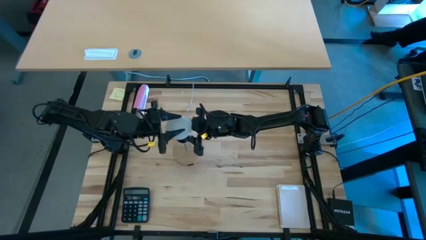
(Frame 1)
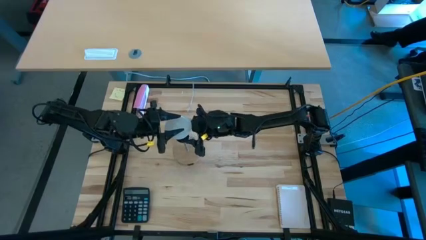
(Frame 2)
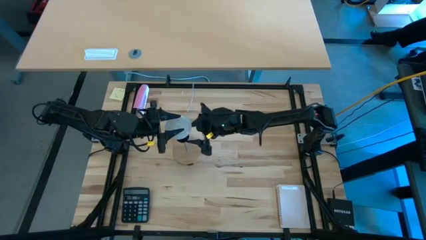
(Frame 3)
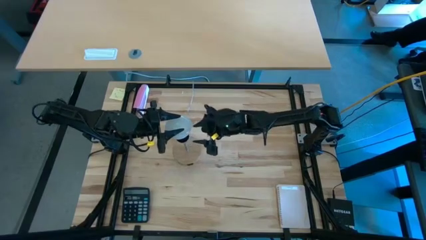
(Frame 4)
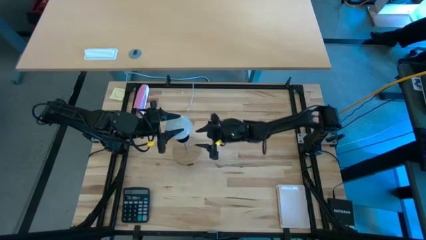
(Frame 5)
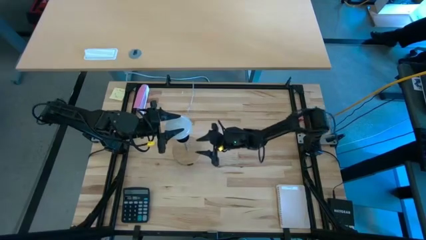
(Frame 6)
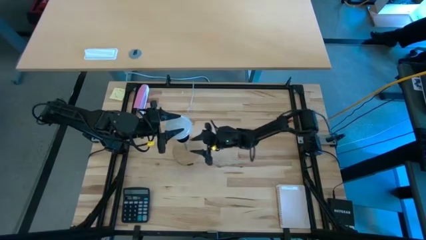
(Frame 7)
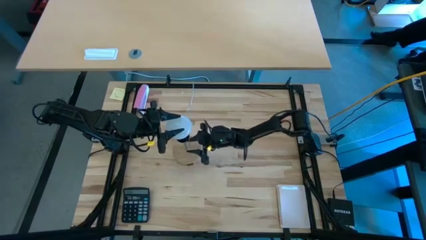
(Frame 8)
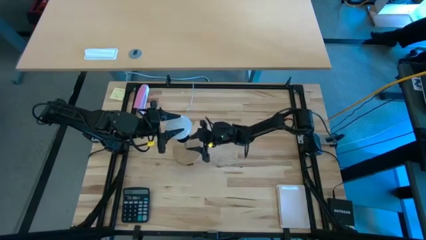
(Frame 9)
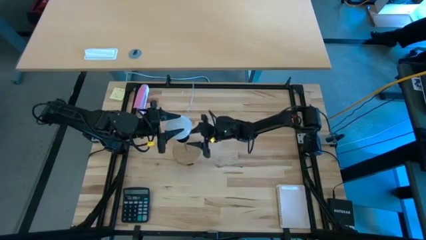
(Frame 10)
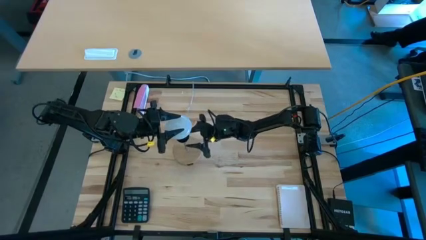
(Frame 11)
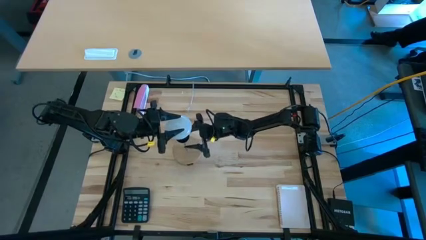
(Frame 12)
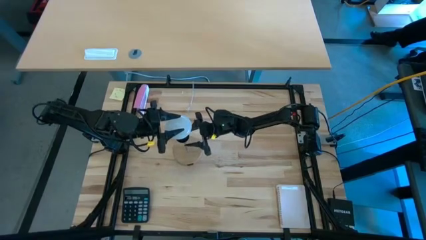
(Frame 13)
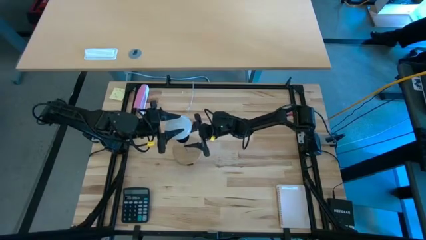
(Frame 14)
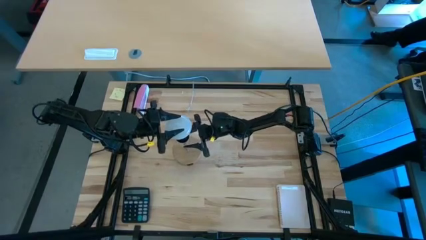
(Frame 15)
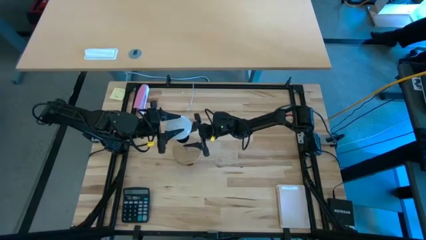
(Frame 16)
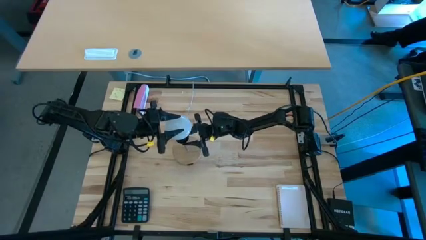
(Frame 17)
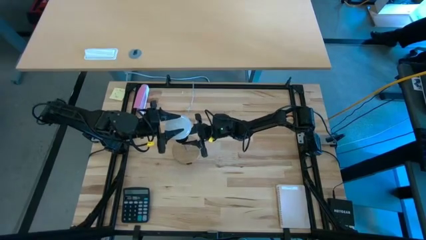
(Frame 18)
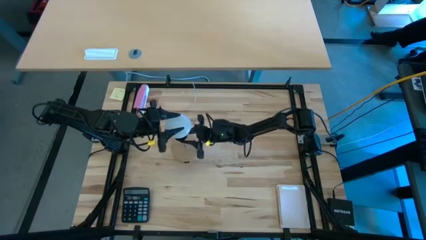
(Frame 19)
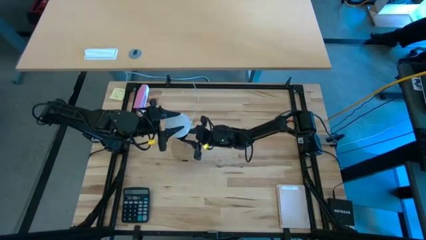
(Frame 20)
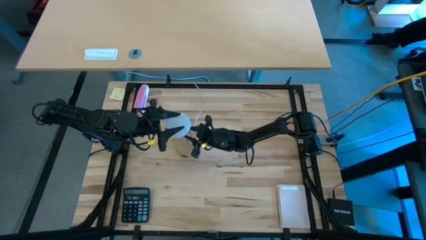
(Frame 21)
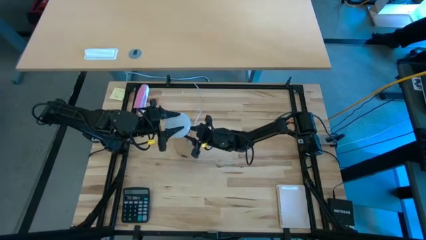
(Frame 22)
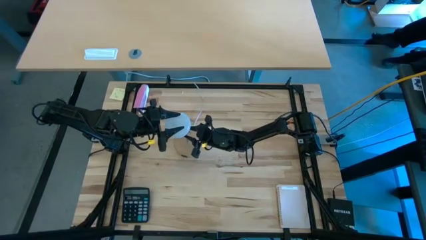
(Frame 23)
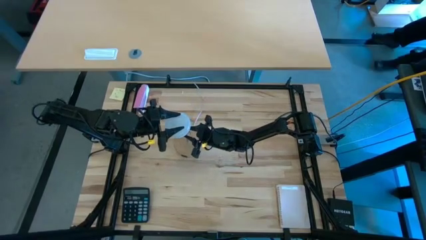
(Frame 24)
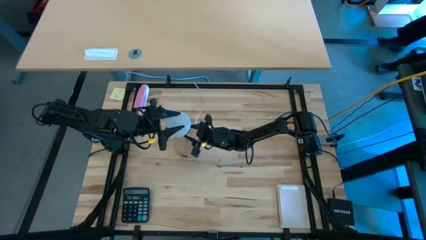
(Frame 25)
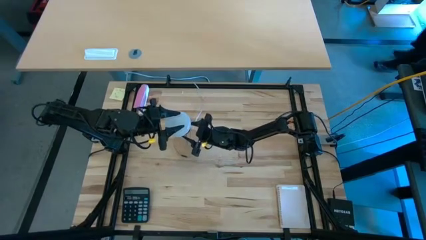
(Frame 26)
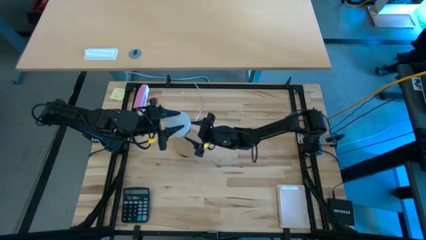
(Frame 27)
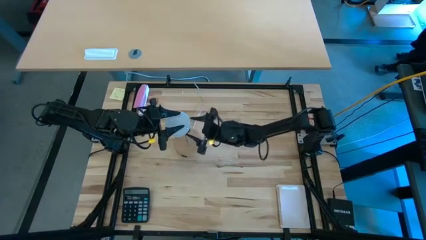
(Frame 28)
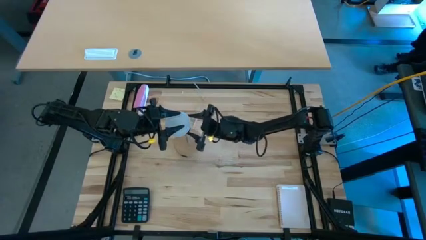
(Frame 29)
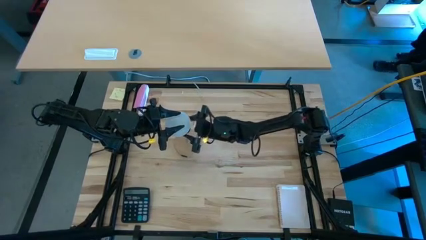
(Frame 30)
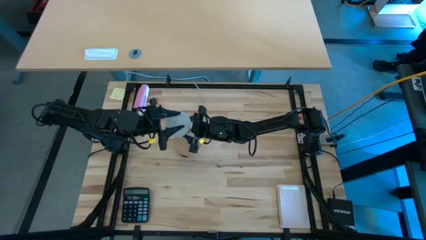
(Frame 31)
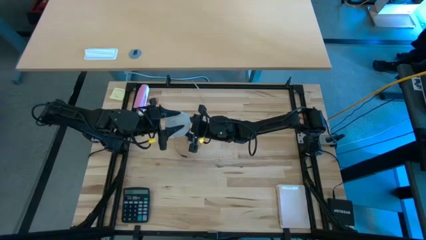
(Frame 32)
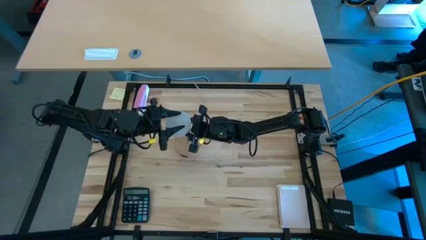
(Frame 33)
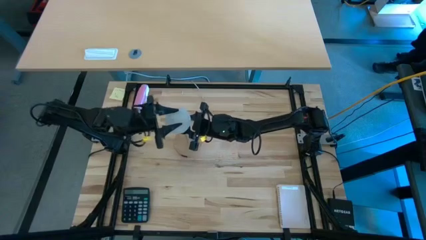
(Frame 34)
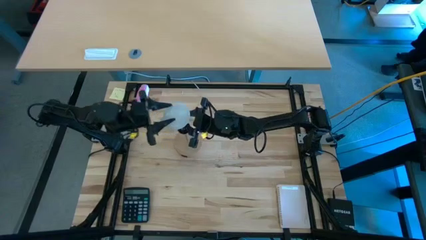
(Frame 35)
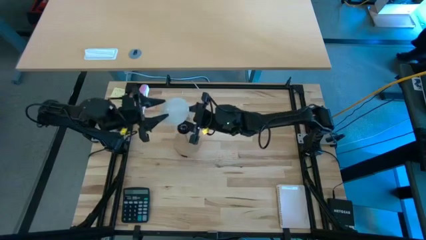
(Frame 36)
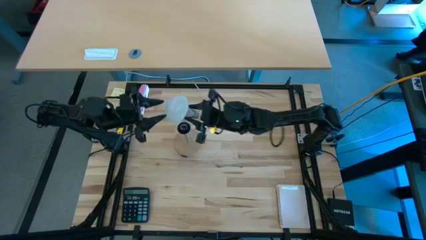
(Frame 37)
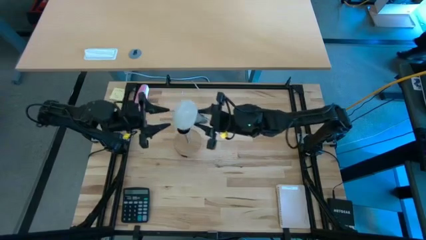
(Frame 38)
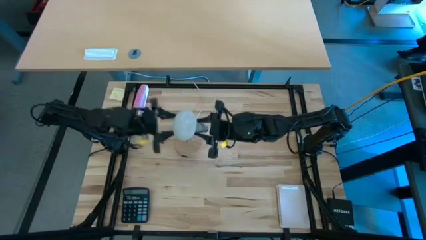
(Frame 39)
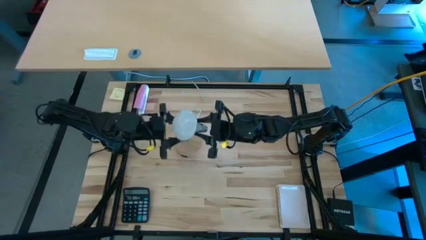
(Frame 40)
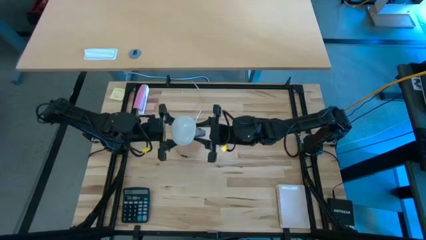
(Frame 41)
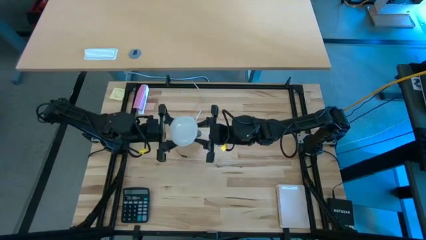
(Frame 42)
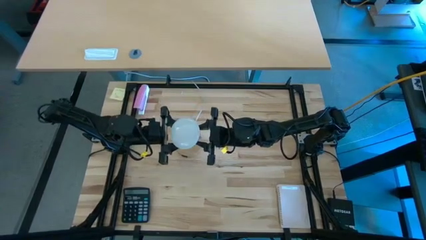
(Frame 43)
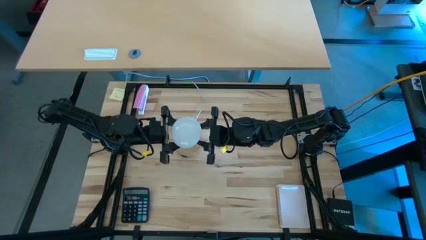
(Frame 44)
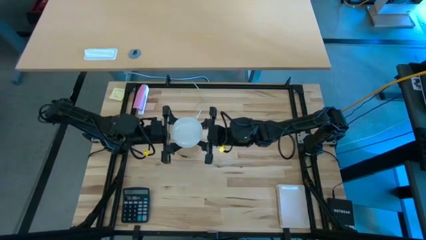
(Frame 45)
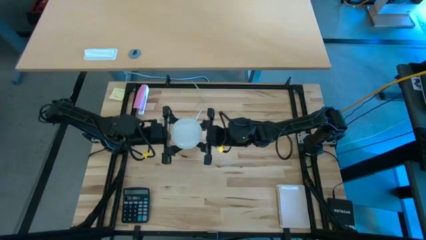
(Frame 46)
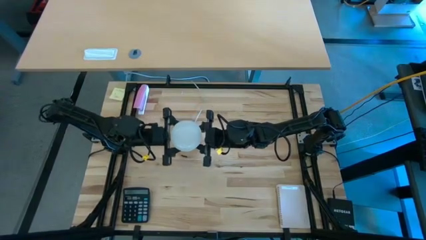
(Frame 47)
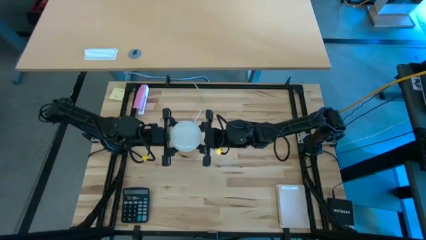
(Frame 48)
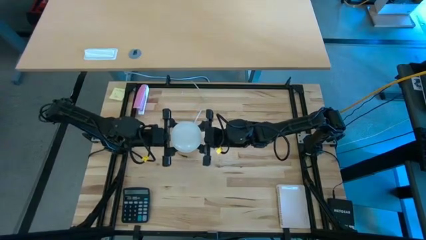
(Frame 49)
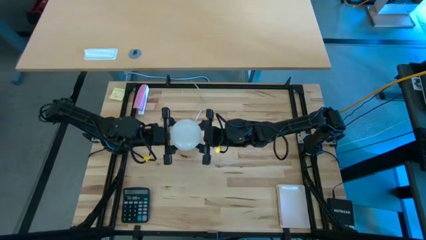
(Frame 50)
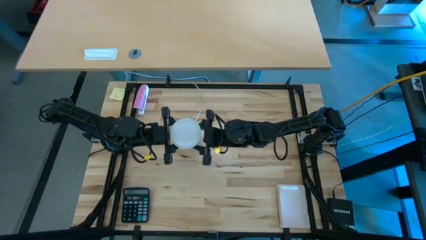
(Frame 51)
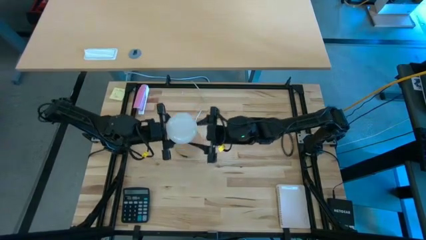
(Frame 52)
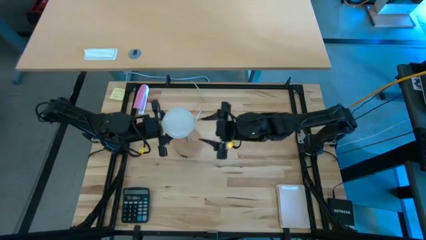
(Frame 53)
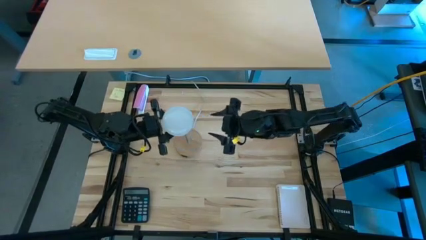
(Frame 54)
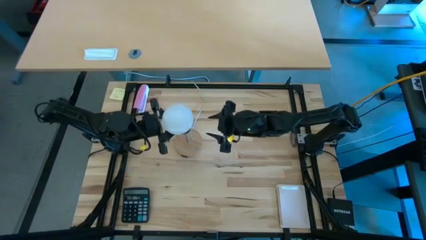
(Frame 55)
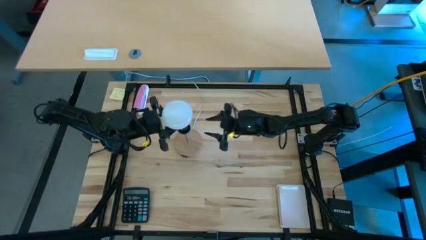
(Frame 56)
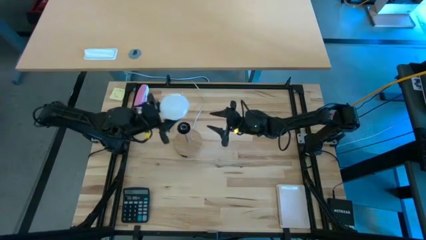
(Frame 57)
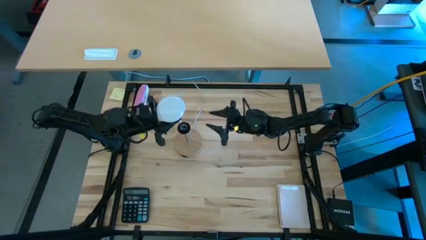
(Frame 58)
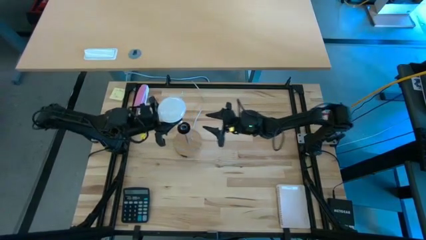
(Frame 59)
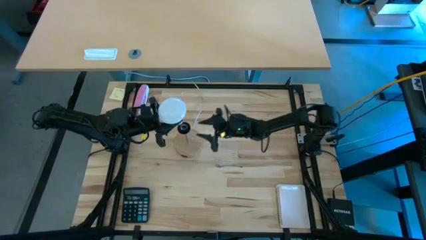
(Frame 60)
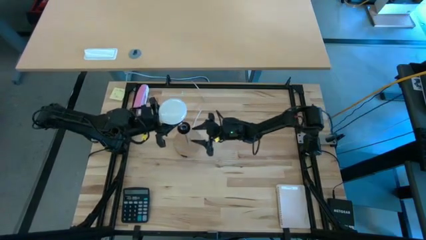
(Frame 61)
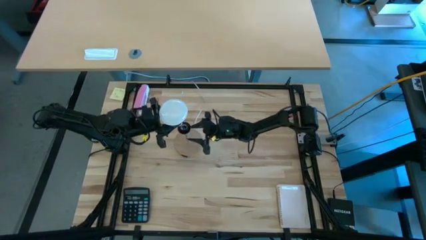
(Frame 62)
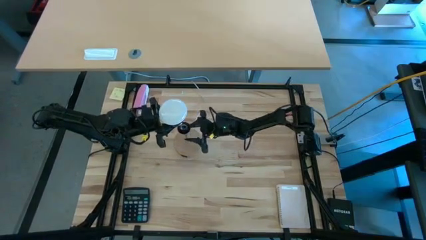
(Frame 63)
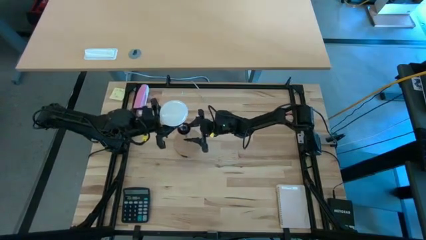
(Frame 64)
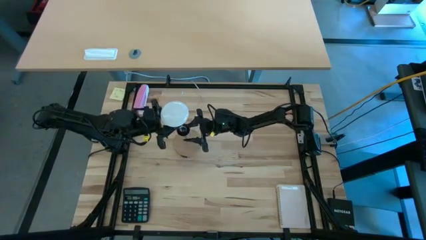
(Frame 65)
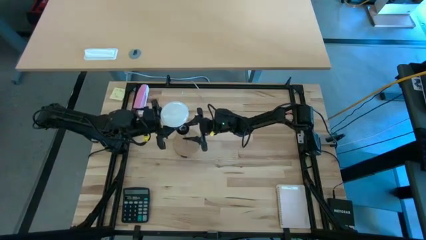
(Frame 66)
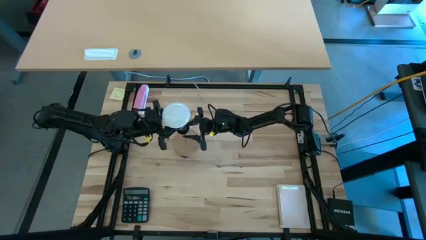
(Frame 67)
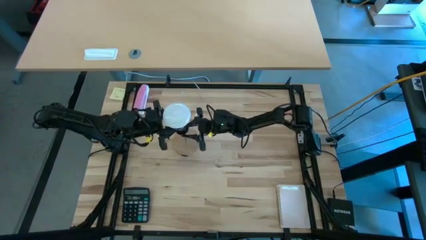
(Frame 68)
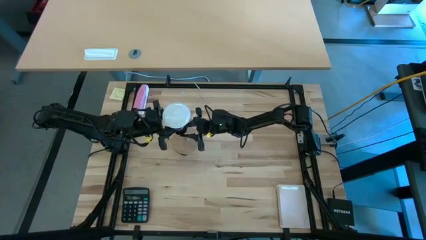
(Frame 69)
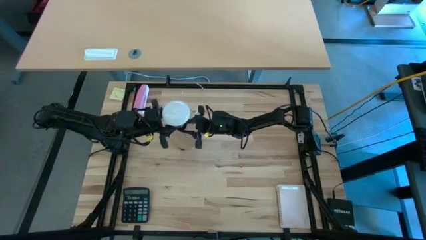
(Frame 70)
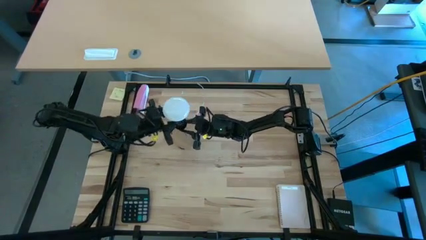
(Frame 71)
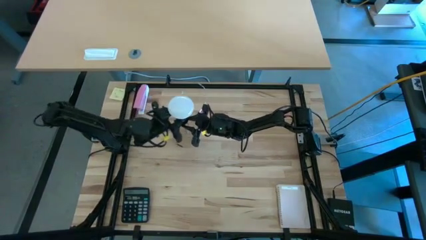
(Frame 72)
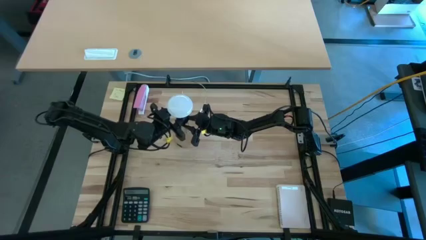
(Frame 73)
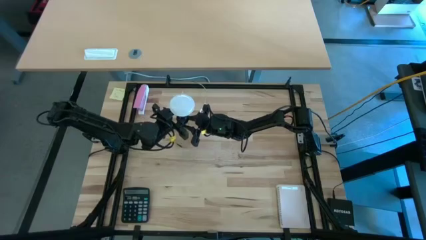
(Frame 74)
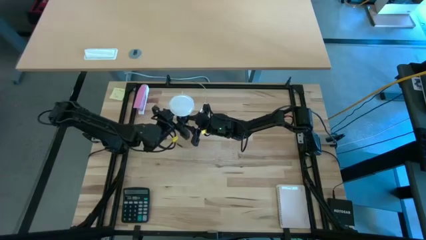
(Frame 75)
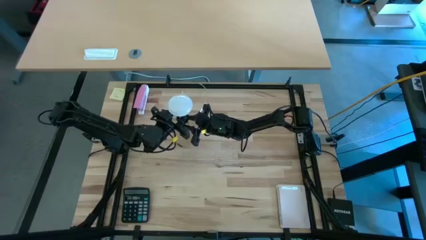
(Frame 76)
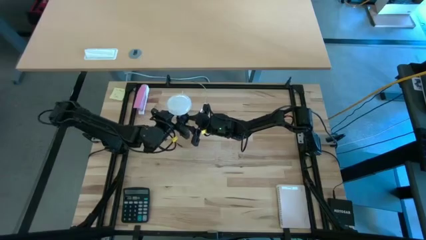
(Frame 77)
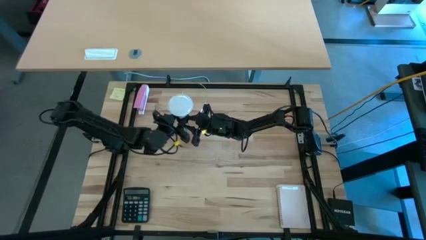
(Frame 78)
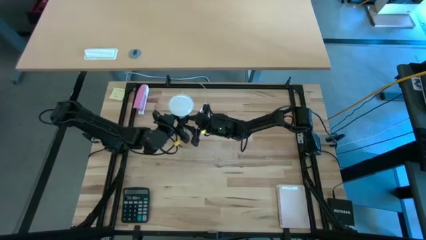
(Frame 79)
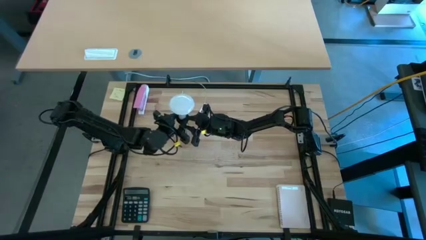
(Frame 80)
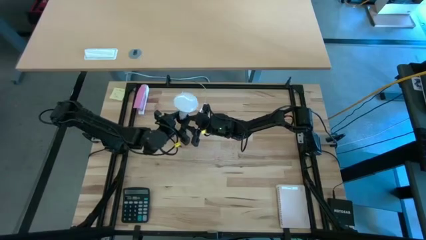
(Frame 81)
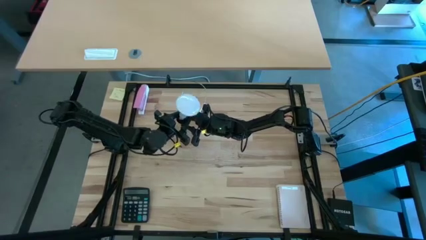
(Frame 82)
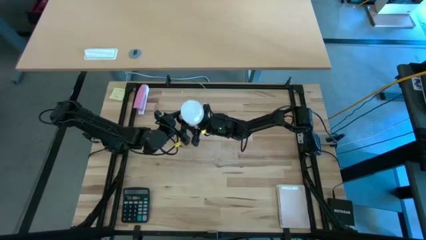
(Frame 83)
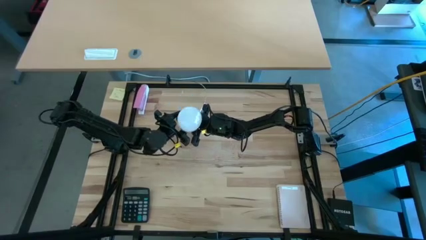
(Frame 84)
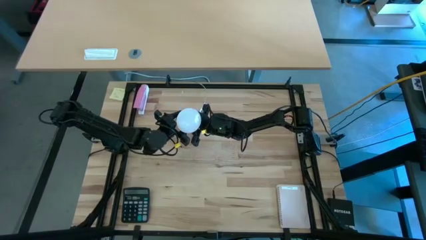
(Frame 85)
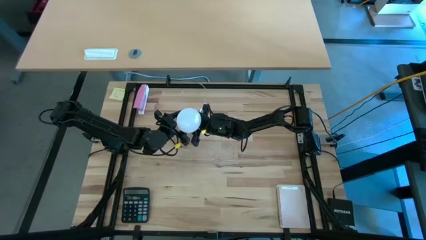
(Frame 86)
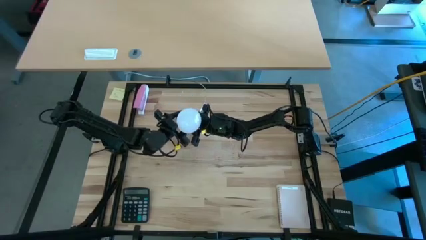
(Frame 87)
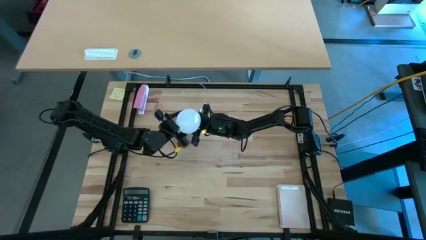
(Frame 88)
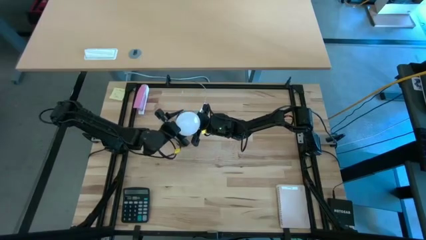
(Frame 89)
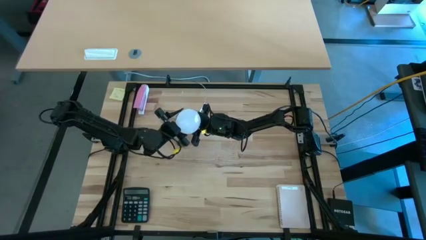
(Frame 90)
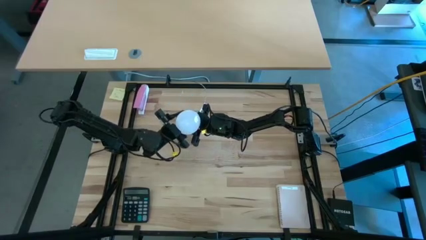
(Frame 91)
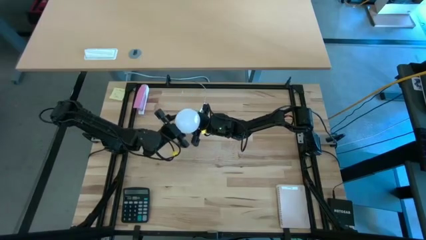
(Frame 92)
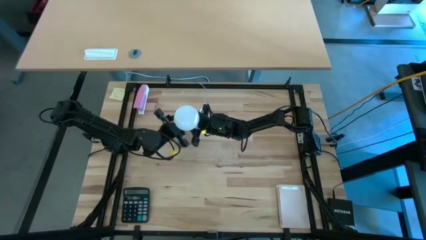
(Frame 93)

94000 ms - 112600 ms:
Task: Screw lightbulb
Insert the lightbulb into the desk lamp
